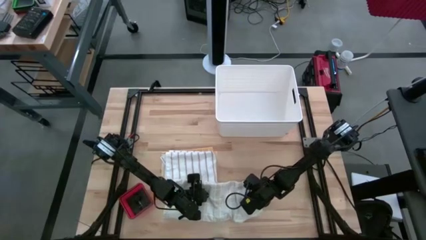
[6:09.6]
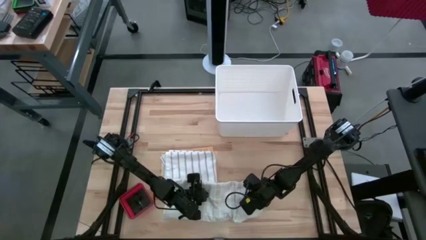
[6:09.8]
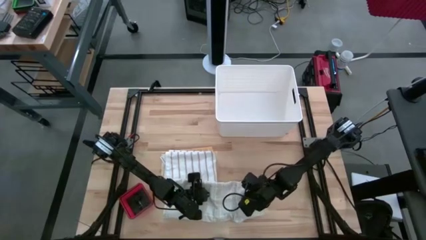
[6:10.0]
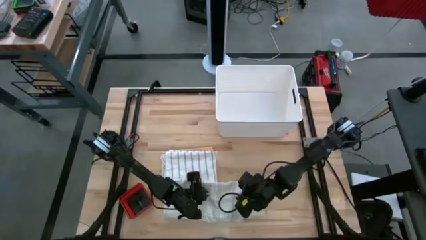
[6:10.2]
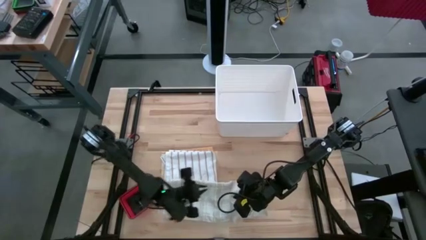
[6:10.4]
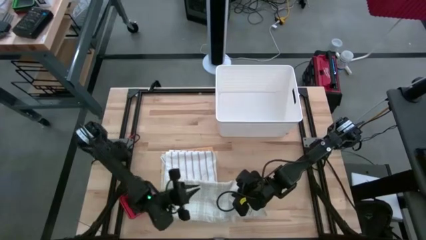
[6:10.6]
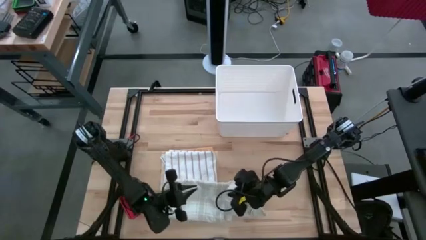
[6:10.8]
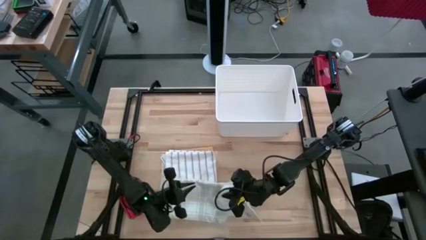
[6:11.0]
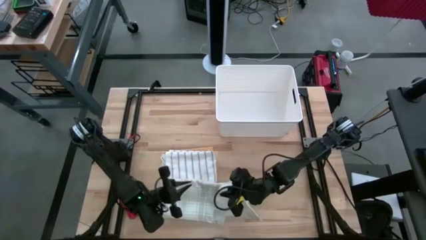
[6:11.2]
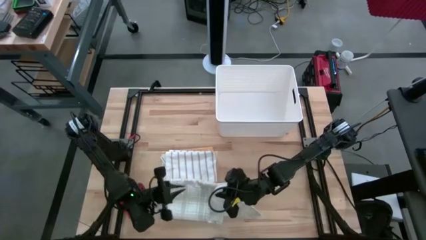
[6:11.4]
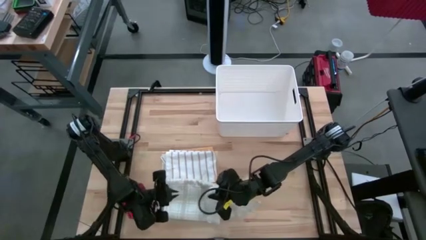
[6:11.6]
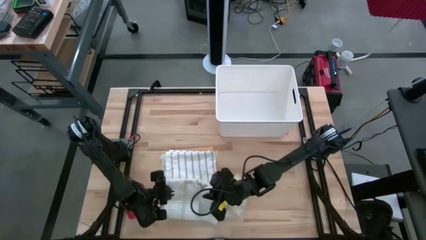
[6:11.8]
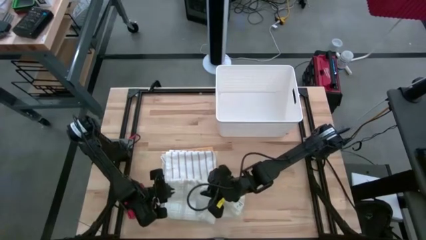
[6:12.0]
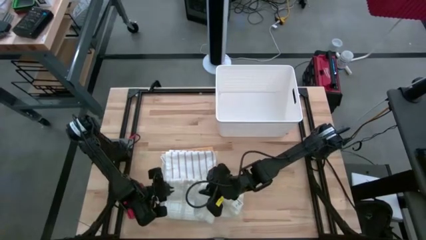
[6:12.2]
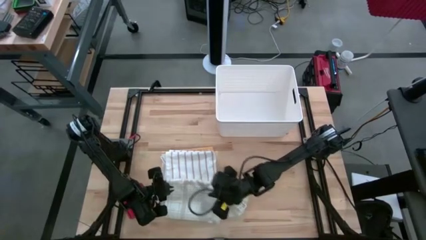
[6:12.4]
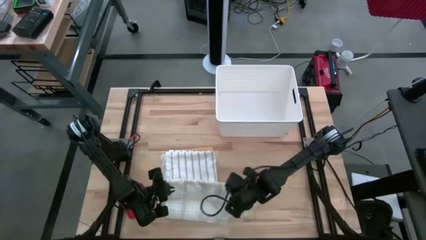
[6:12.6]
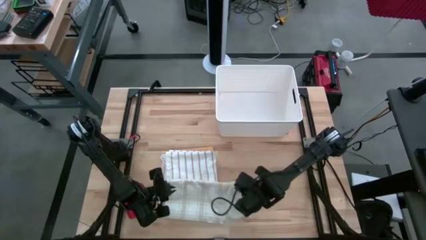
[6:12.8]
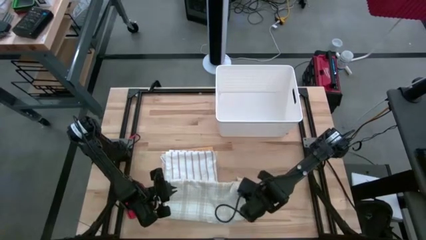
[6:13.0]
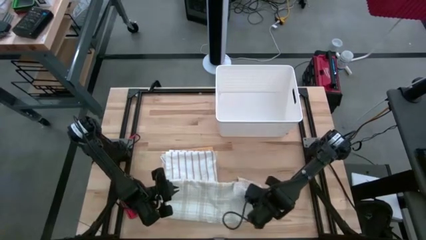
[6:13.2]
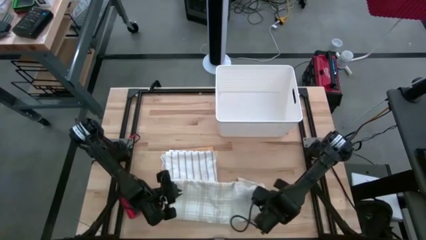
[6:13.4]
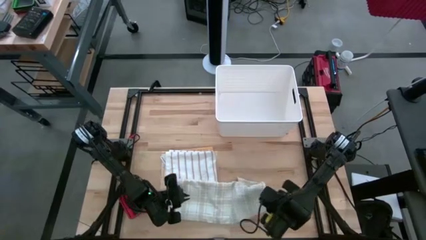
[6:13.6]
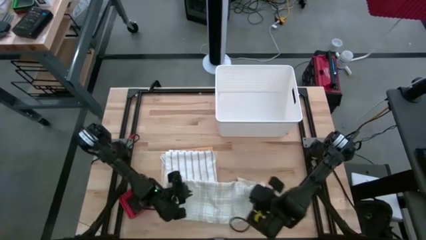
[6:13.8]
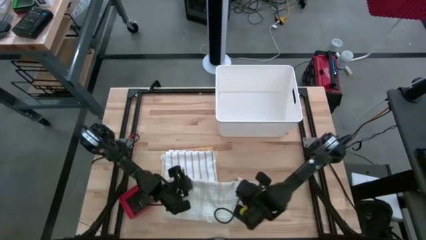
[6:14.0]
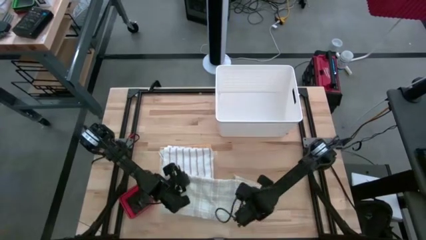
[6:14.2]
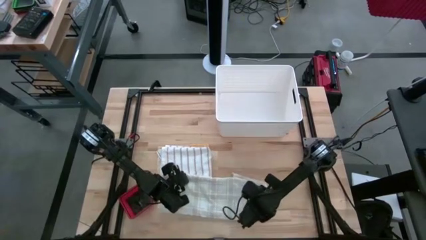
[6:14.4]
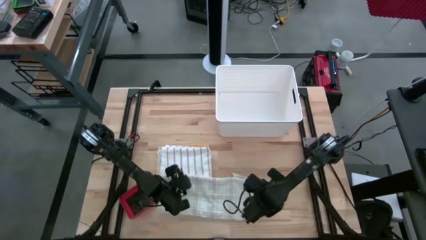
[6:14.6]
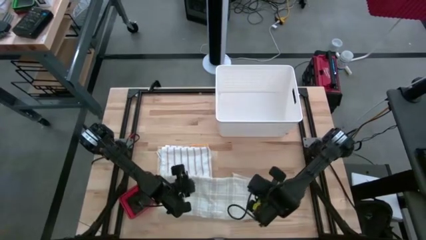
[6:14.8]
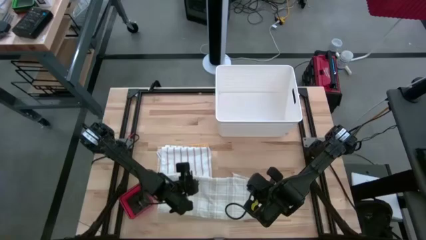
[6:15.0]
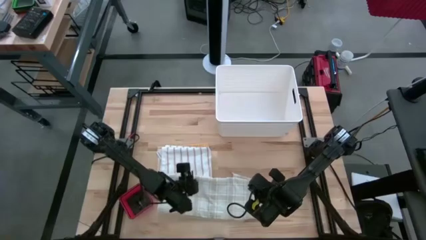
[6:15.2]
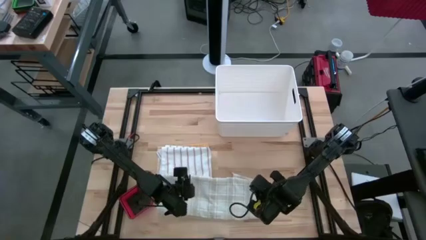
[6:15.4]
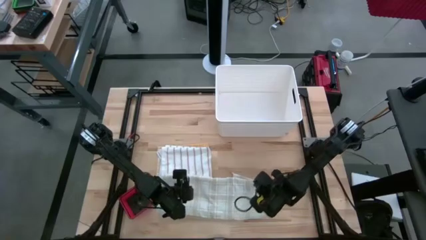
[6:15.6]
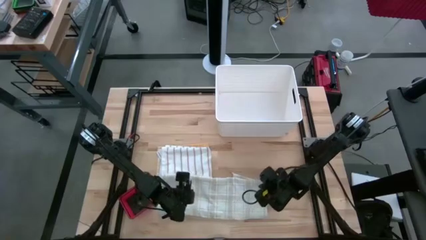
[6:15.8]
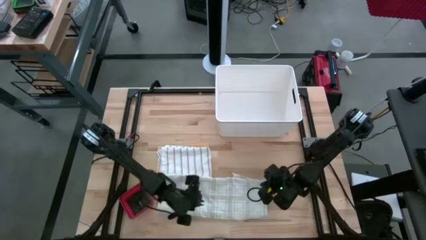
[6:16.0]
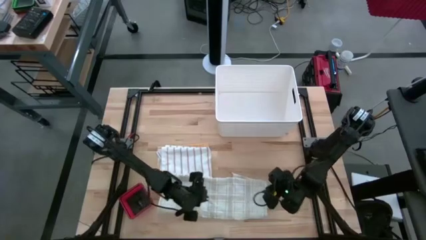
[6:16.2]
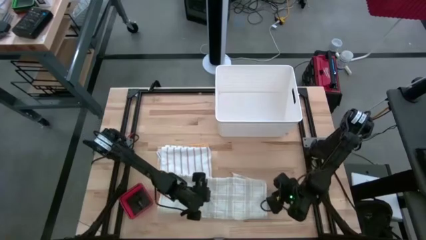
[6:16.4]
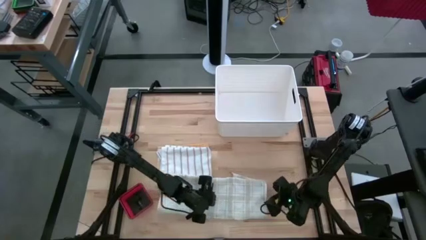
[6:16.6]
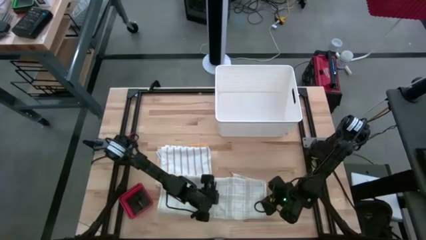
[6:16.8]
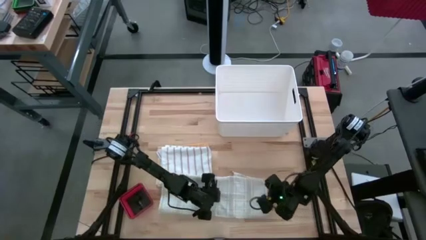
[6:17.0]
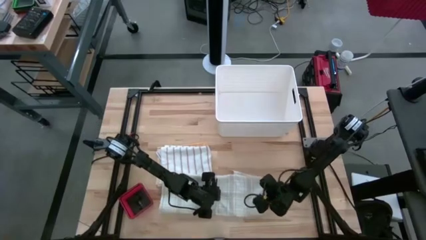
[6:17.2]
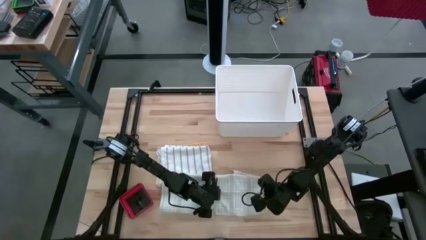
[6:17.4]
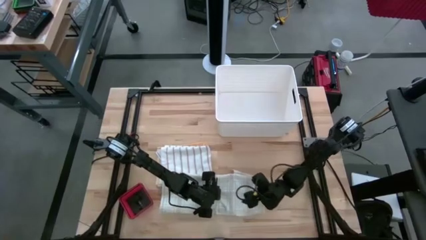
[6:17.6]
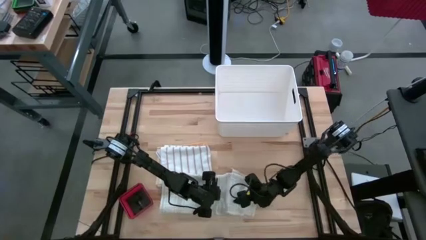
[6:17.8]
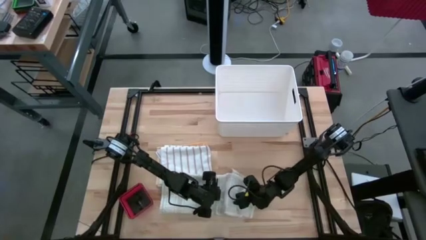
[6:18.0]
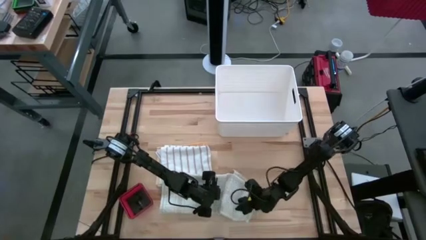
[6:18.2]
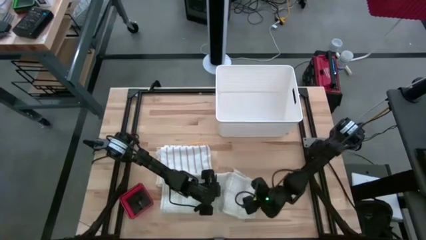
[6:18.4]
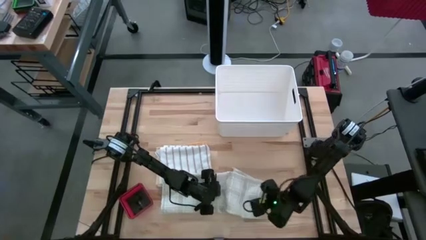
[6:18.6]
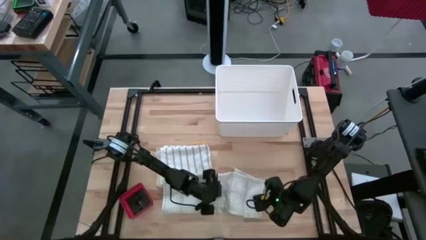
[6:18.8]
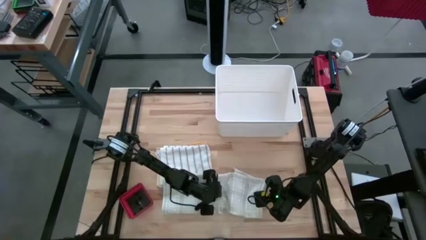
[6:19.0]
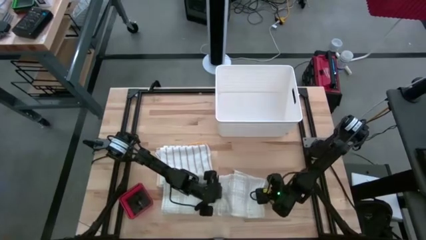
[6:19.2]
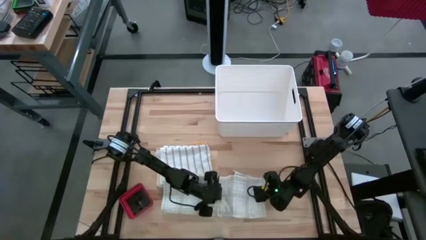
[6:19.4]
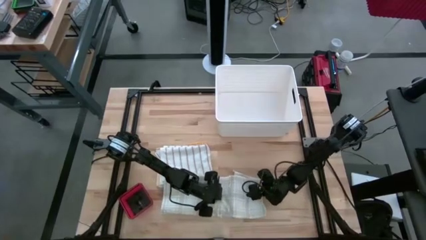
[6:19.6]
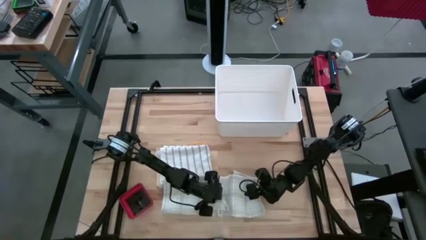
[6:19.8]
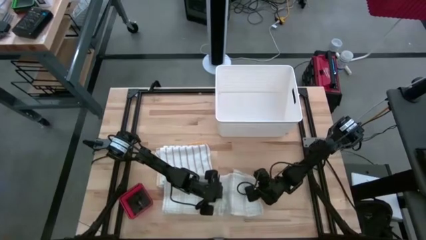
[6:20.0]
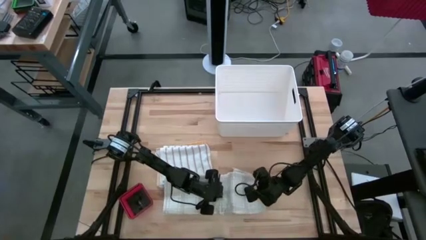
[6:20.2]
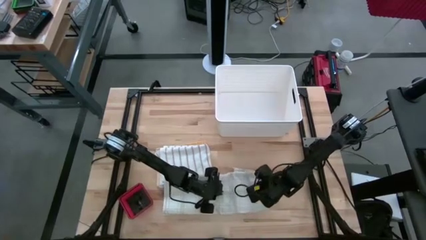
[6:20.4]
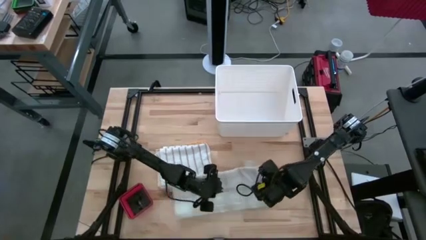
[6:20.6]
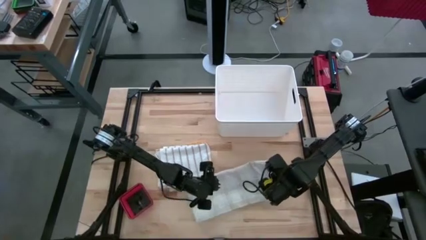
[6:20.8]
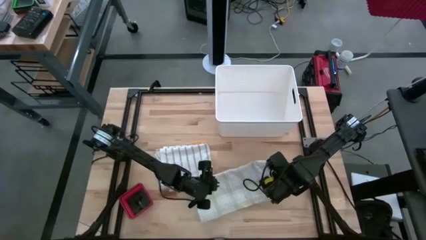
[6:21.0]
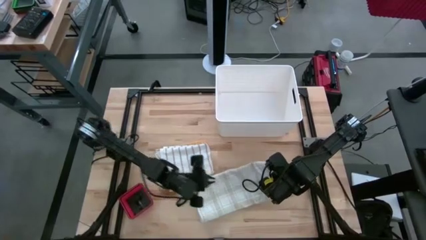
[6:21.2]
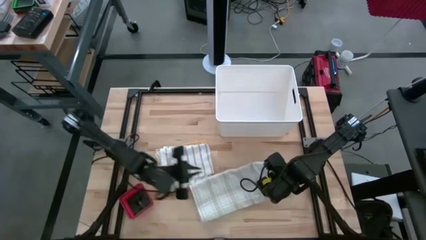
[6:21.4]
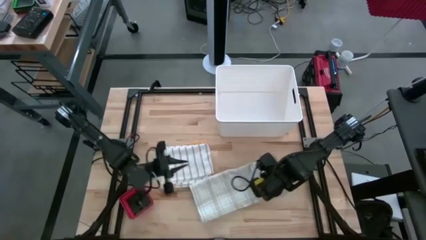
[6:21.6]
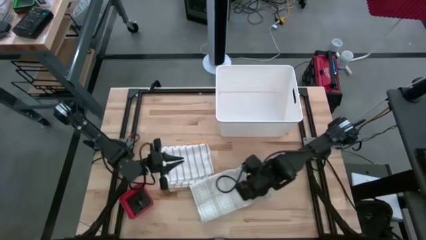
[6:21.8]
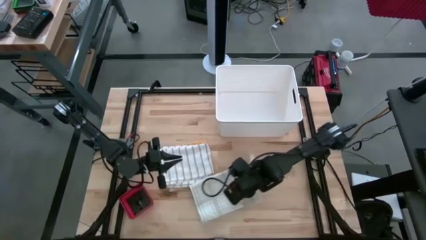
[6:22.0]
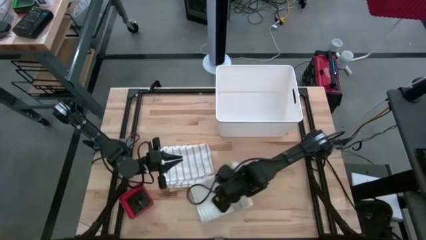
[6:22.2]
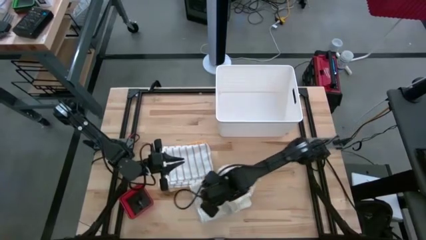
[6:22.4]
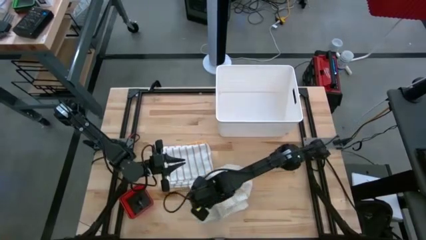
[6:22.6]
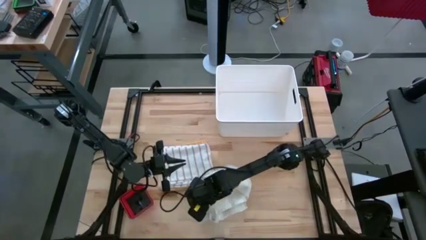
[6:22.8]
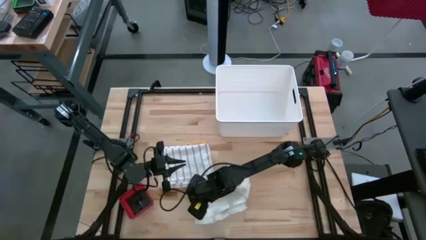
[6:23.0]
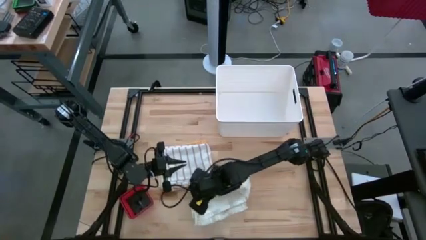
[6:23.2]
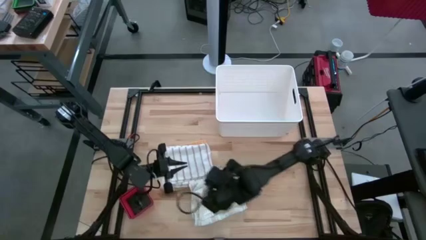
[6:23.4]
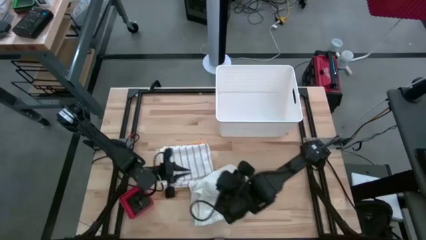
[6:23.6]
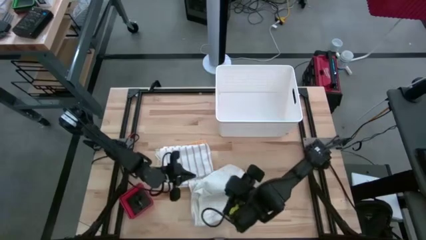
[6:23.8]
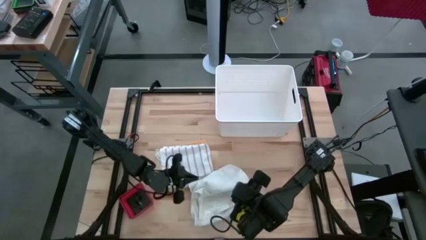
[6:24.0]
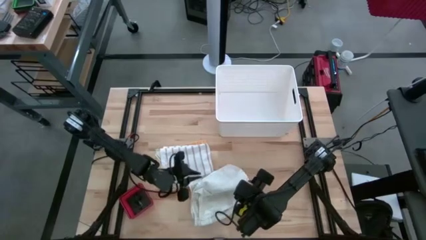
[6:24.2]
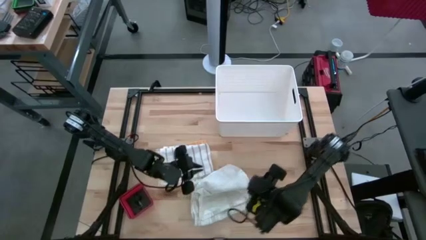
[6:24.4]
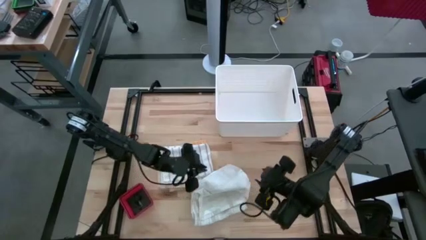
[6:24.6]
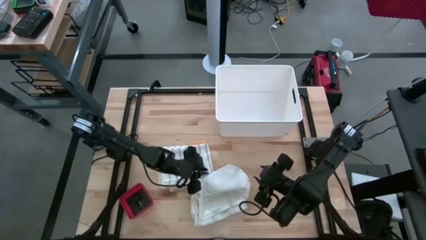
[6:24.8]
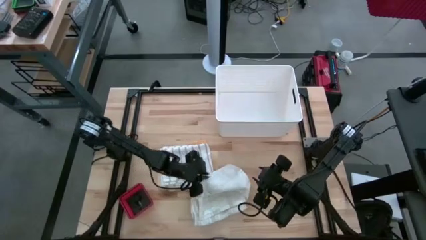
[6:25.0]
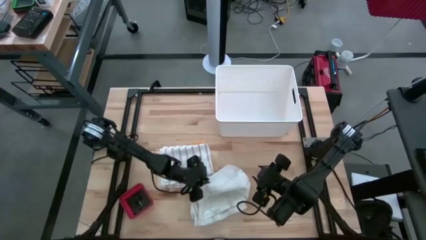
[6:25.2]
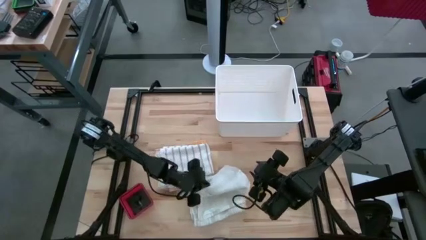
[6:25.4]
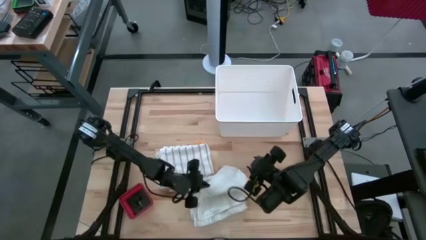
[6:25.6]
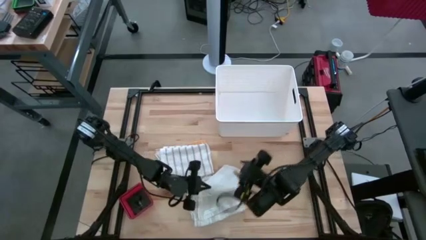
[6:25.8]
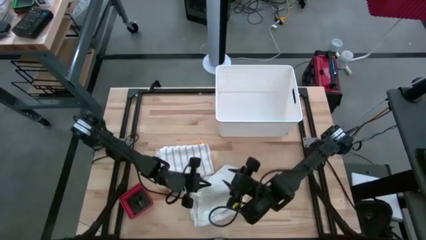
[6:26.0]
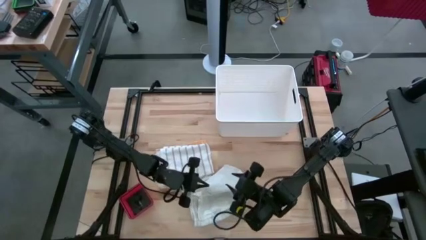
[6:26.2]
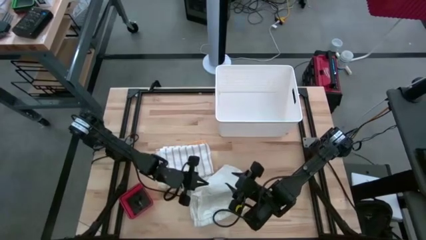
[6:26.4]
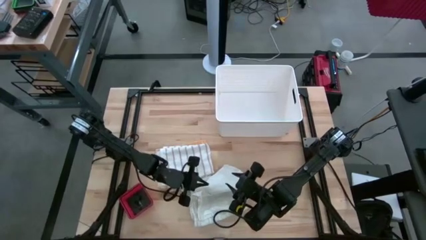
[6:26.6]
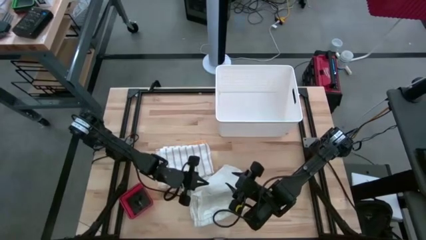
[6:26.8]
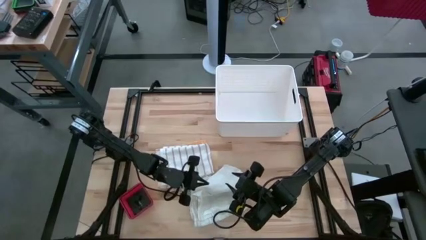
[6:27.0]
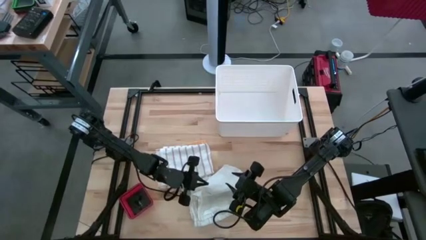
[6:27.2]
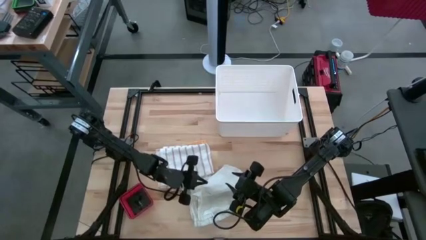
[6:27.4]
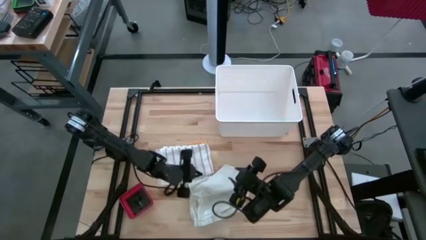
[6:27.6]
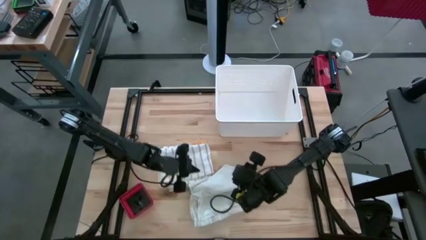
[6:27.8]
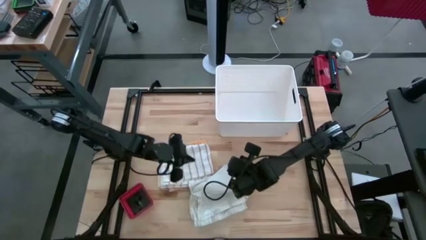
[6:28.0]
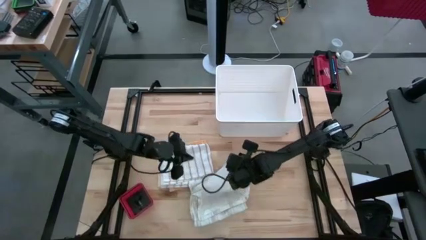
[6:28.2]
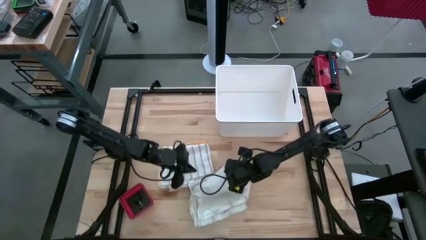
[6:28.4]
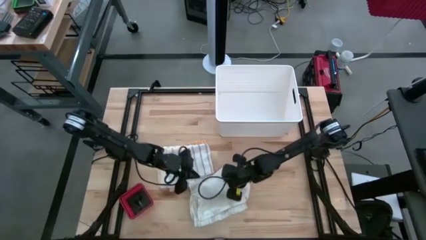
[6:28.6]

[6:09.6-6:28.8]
Task: Fold towel
Fold the light gray patterned towel
